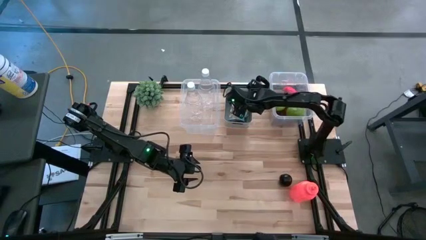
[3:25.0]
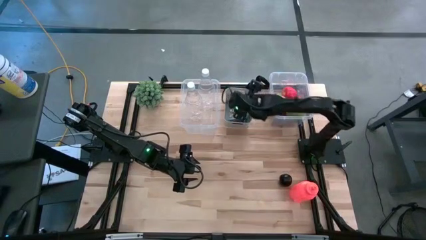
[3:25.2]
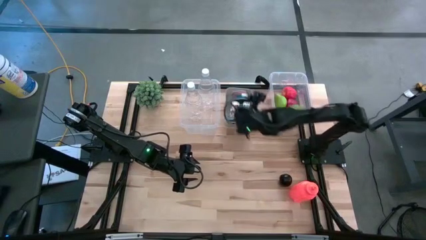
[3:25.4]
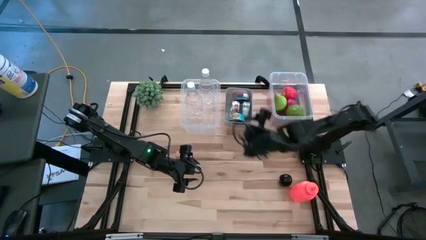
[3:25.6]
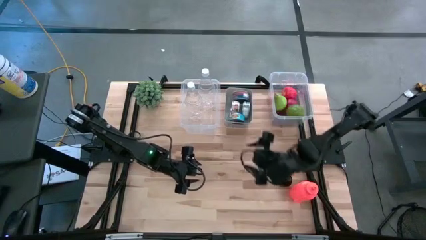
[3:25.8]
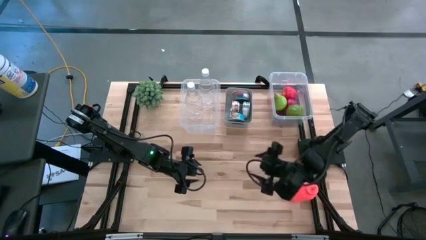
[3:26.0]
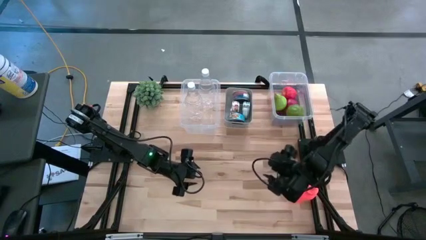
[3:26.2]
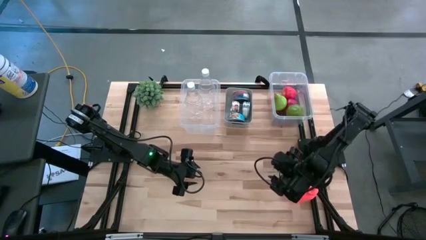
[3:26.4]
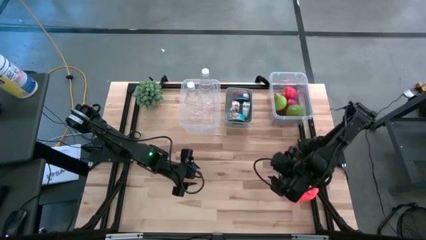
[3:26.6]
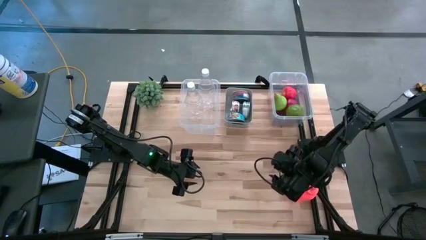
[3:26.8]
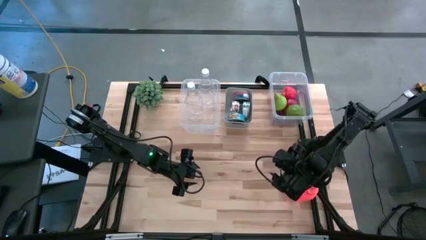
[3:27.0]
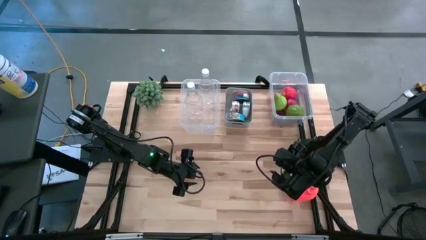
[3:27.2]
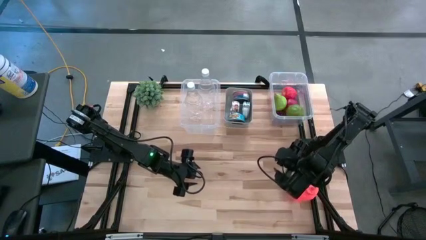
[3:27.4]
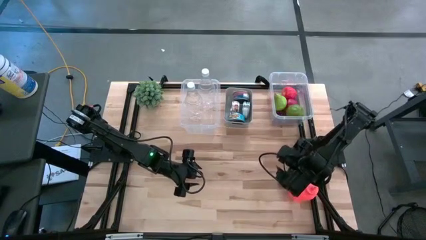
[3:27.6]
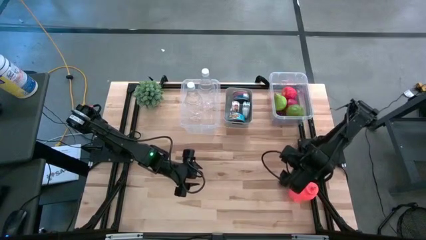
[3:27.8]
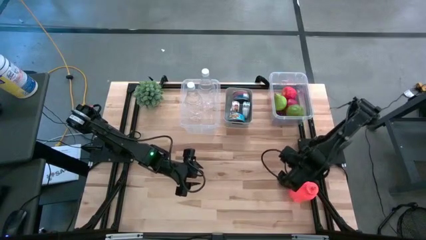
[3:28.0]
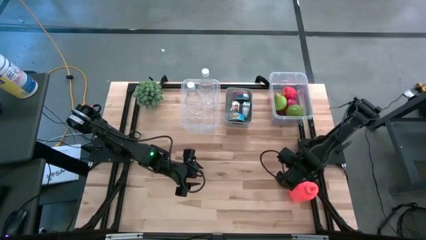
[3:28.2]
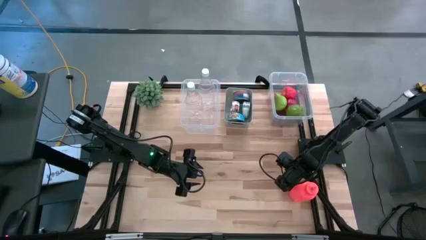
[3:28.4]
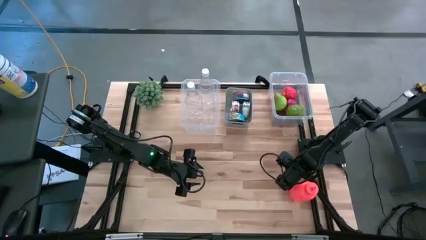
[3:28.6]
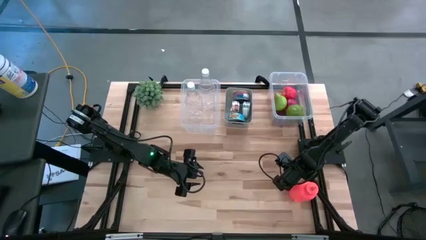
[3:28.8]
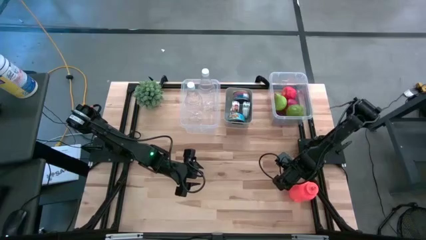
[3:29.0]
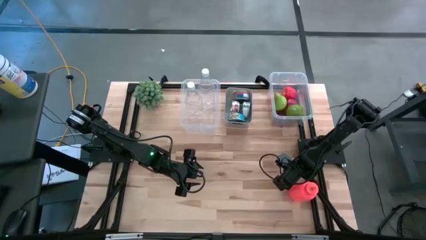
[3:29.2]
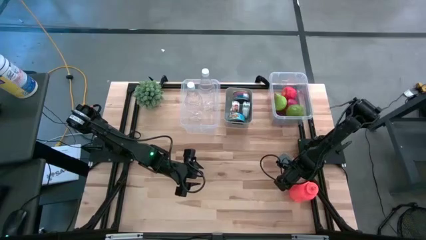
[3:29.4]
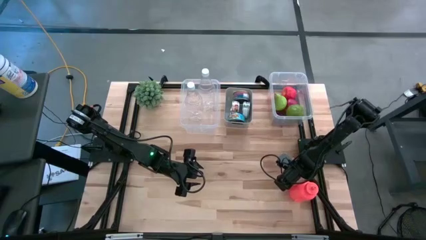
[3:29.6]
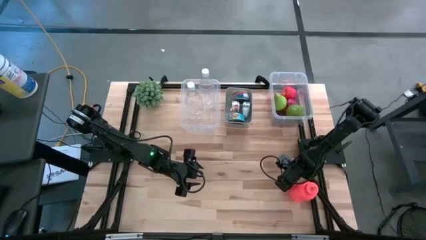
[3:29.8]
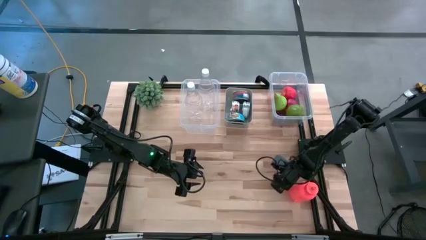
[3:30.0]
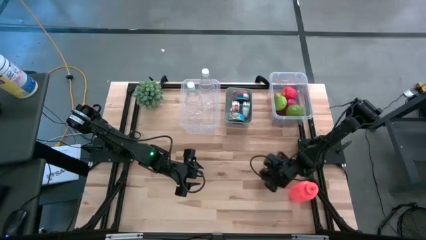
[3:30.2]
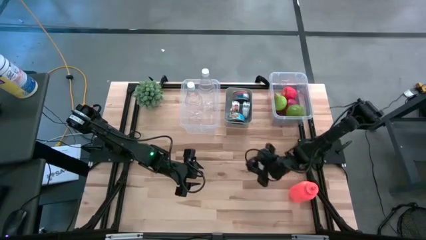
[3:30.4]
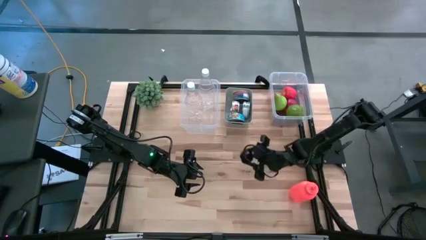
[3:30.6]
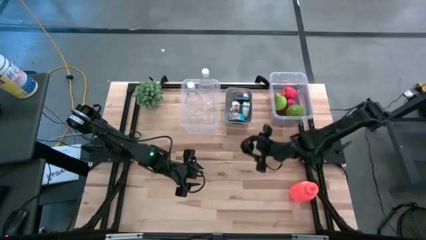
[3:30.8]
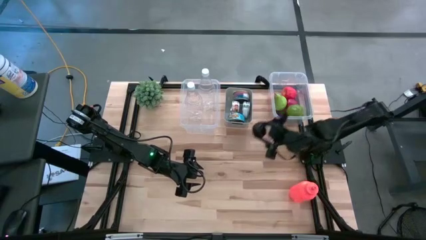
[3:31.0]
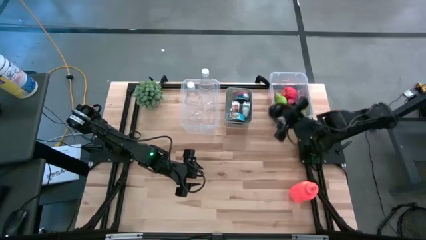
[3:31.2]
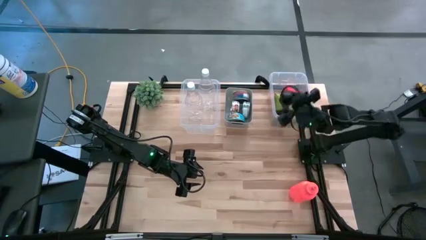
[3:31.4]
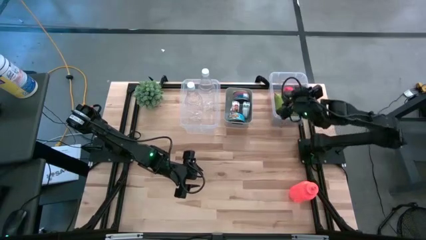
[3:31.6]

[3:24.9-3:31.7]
Task: Pick & Place Food Item
Put the plum into the right transparent bin

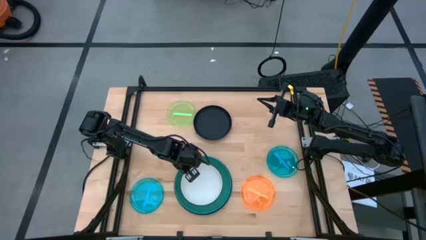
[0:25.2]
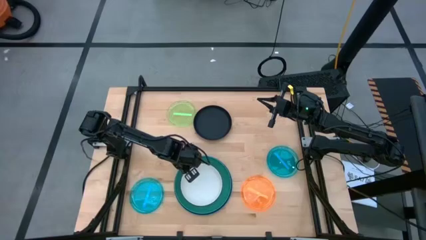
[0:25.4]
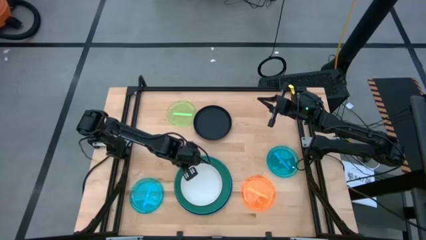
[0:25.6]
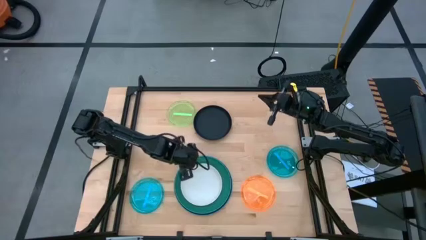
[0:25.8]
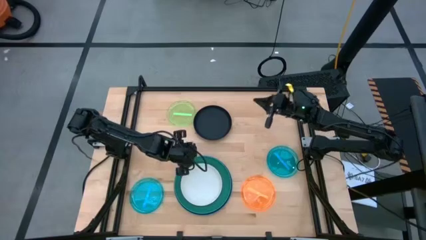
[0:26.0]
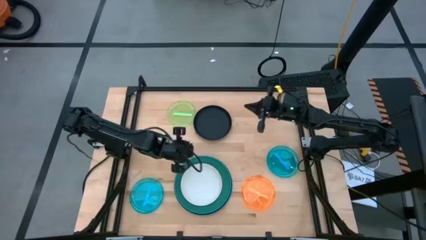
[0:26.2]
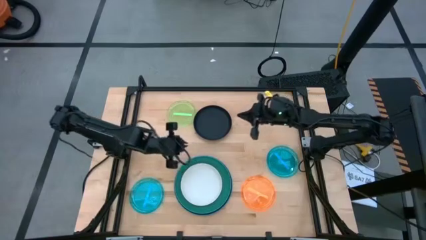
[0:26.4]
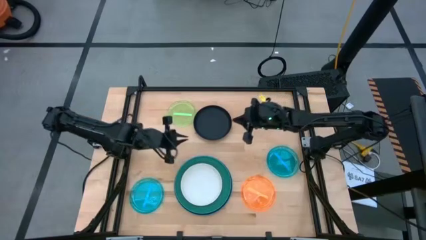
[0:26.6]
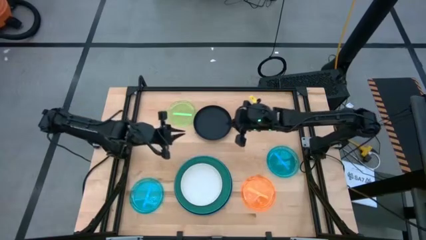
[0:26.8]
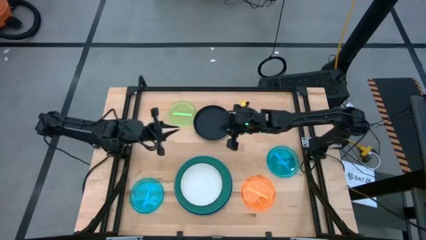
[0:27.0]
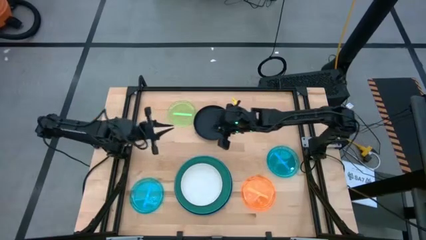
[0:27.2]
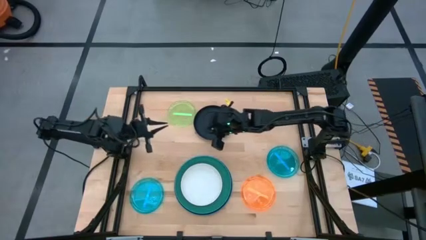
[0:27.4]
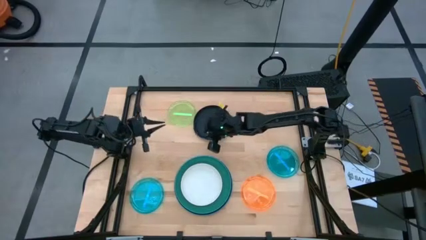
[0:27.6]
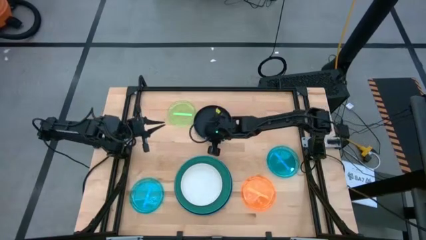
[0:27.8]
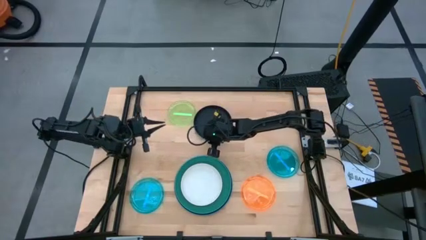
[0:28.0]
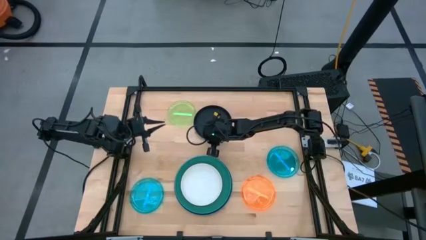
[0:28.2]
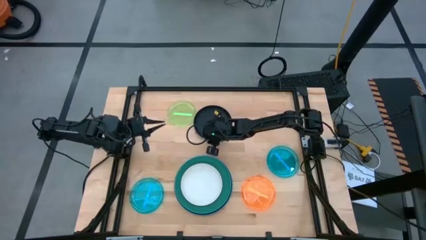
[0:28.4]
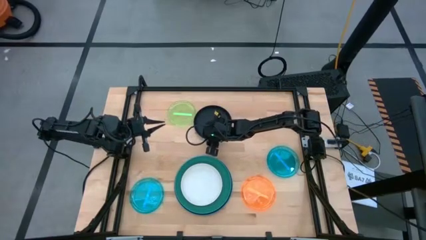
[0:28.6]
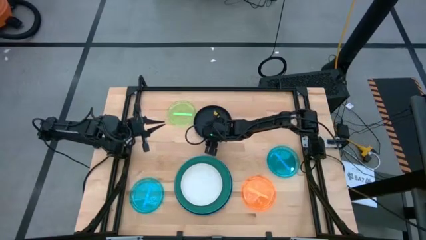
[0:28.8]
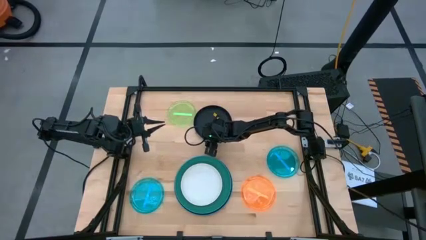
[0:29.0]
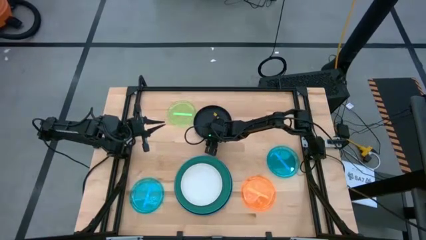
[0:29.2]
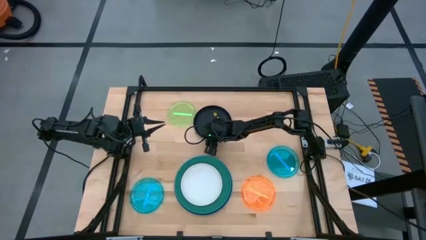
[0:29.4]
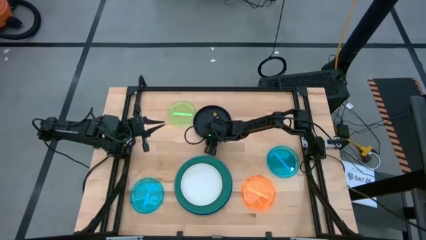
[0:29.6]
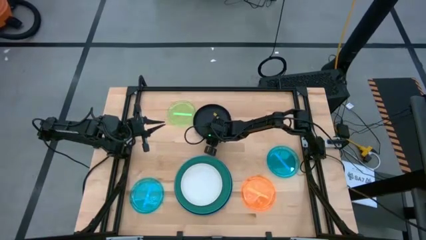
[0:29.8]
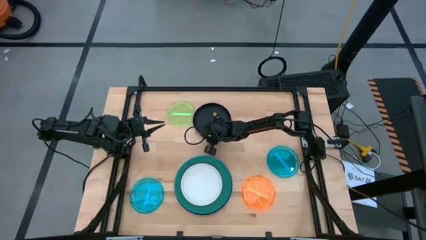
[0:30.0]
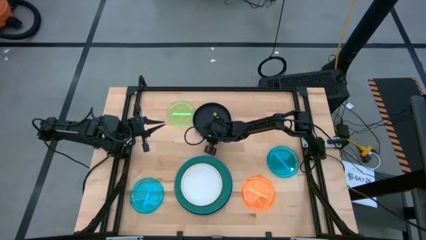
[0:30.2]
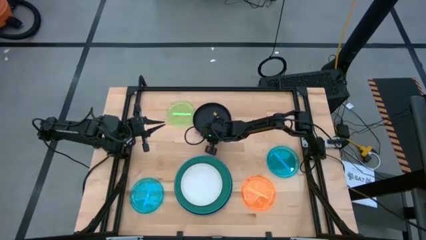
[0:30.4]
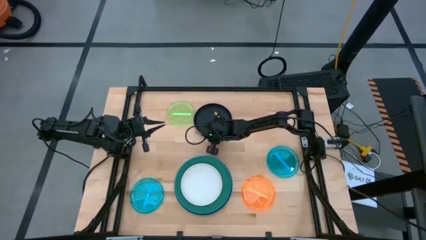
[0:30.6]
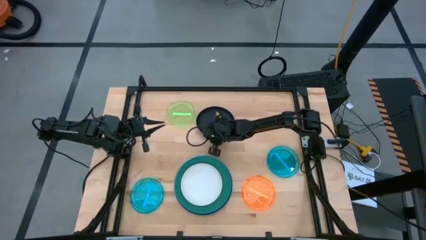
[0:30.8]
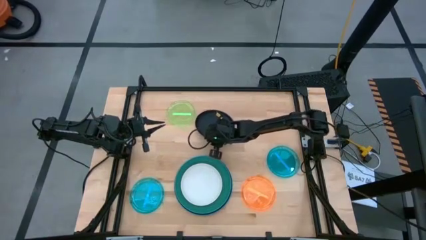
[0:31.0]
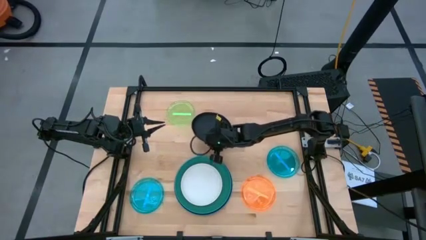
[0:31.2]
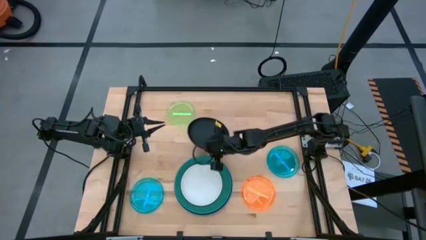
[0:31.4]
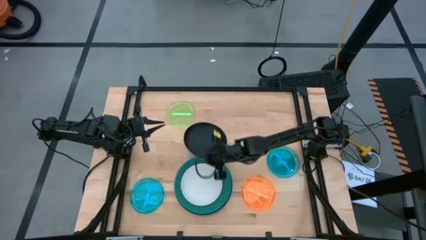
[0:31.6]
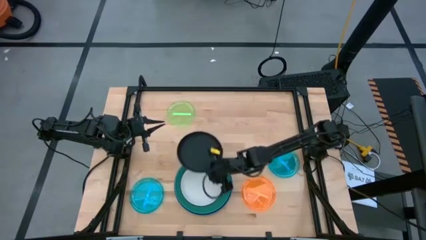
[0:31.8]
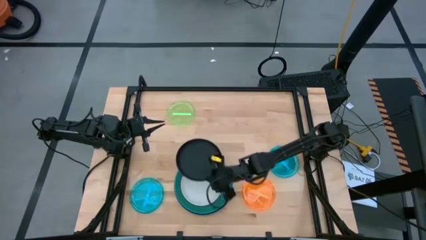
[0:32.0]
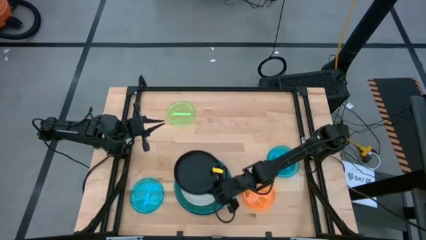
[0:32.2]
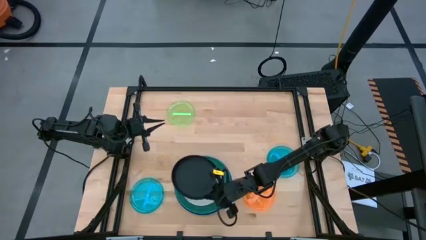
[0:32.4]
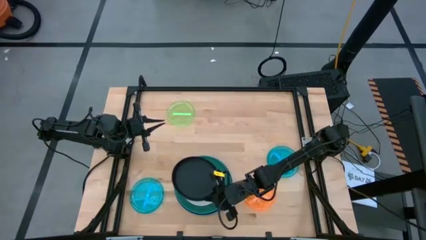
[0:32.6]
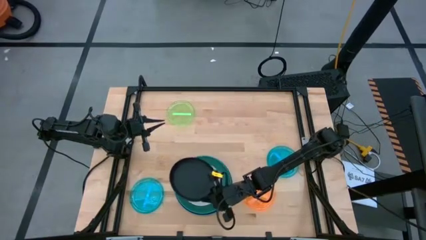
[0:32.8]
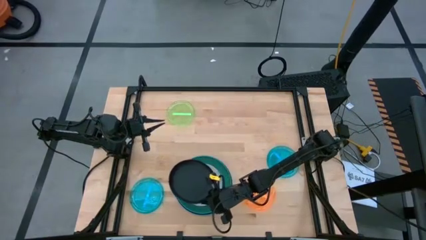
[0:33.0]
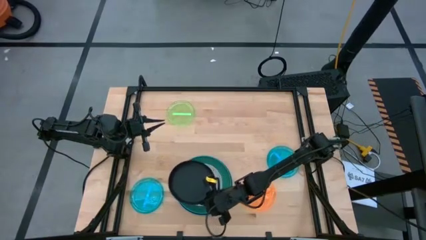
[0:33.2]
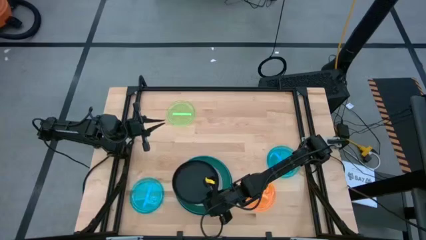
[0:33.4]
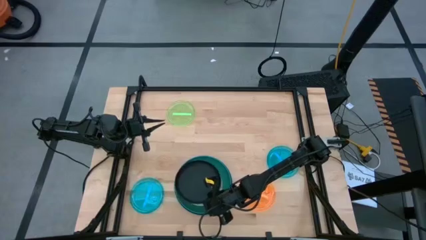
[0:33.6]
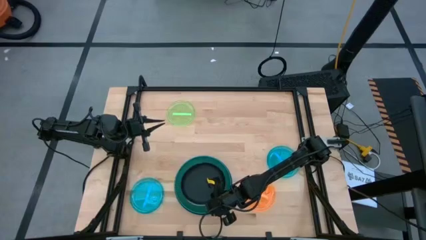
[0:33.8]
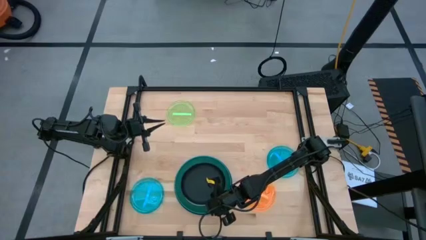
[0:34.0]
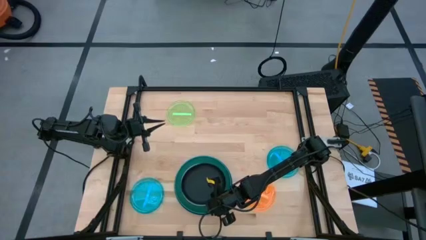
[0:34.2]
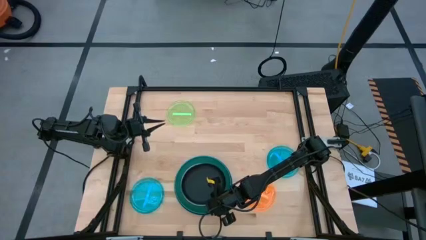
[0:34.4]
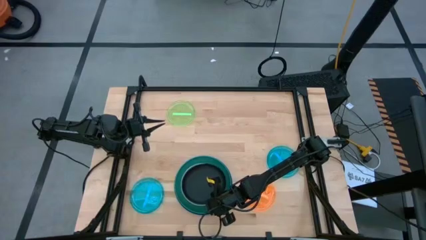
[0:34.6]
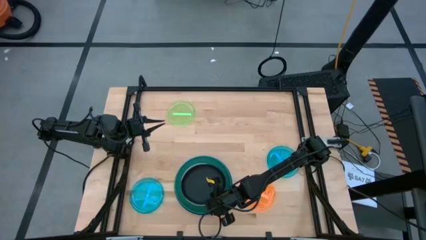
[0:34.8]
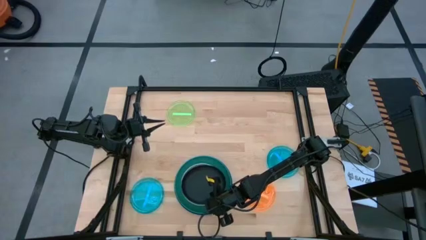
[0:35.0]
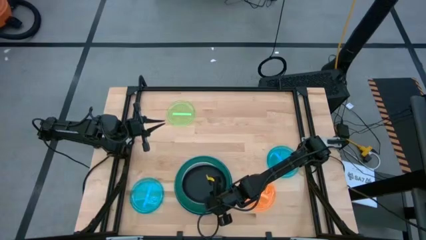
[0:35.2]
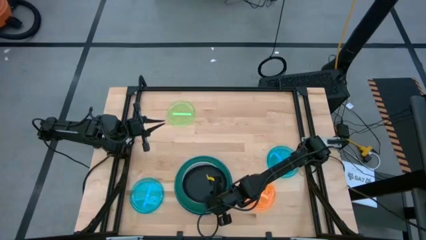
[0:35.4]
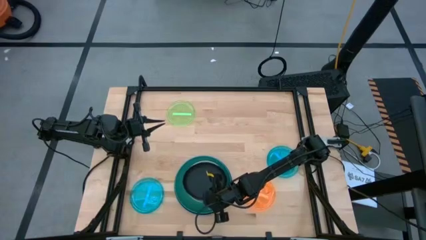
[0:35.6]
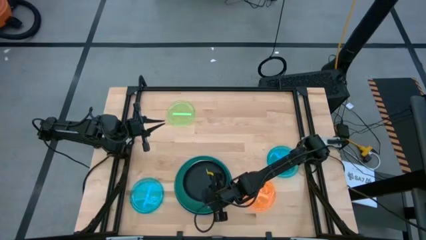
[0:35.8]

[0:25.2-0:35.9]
Task: Stack plastic plates
Stack the black plate on top of the white plate
